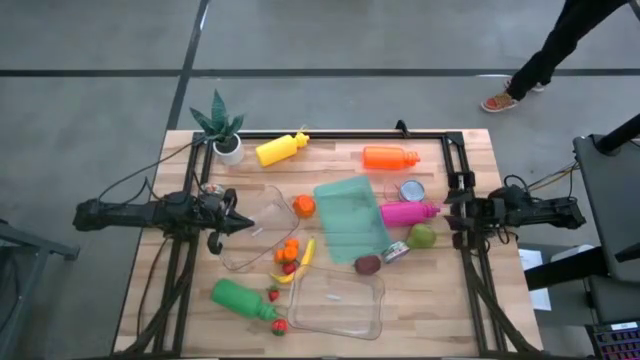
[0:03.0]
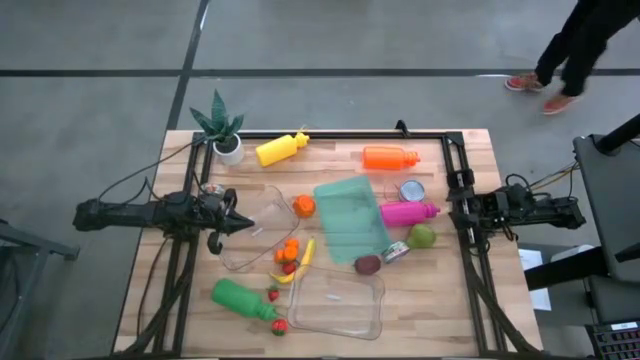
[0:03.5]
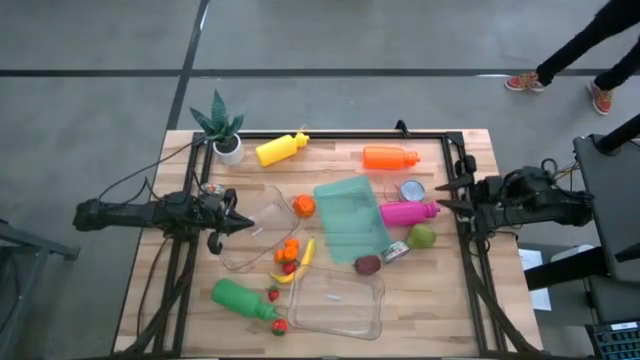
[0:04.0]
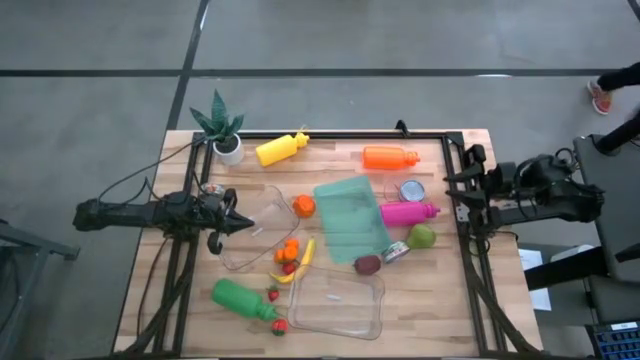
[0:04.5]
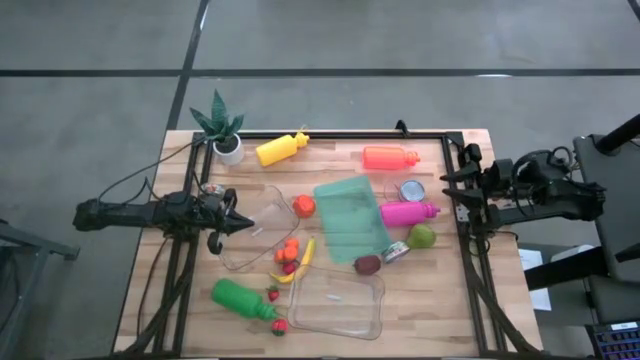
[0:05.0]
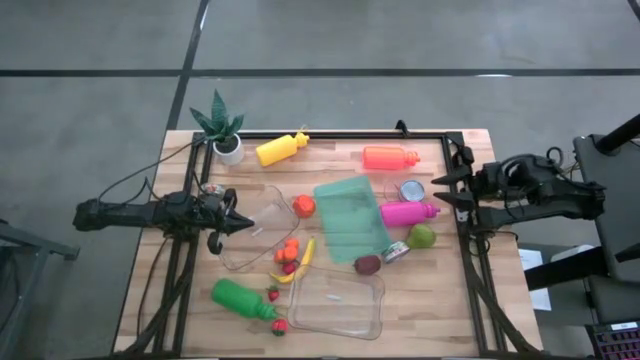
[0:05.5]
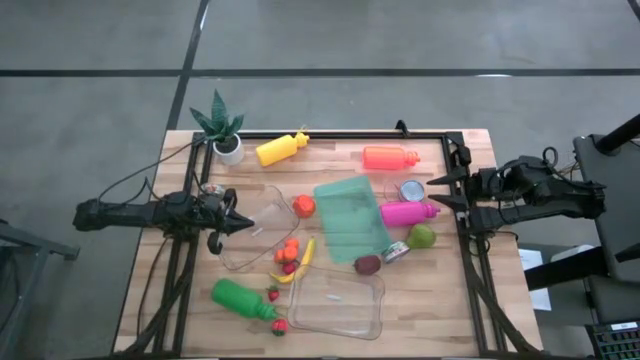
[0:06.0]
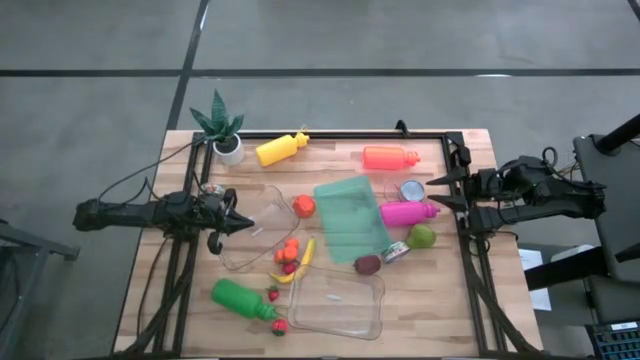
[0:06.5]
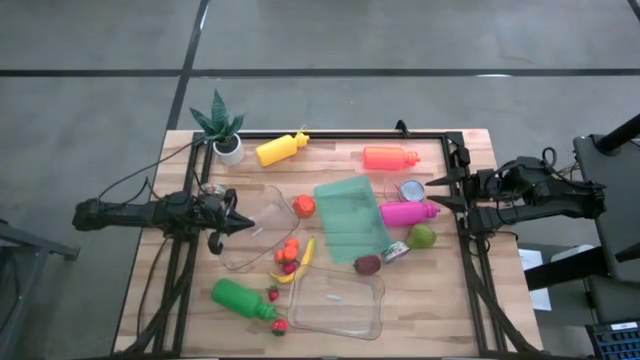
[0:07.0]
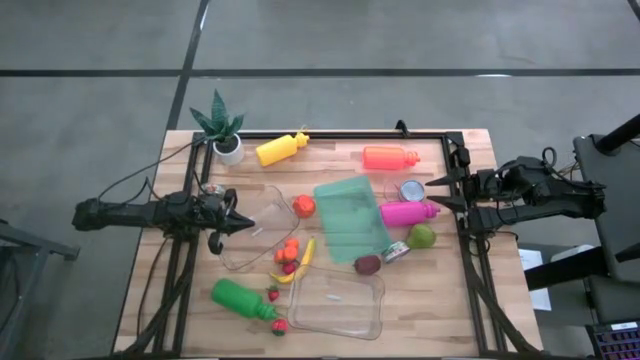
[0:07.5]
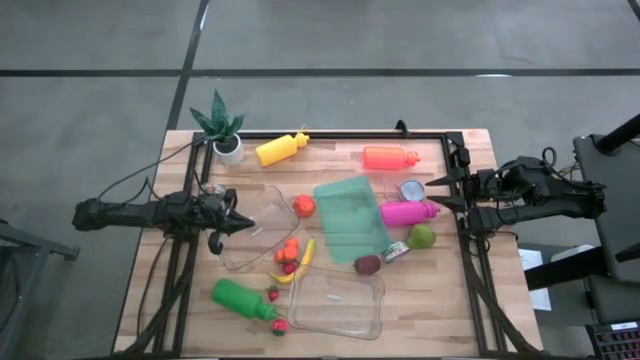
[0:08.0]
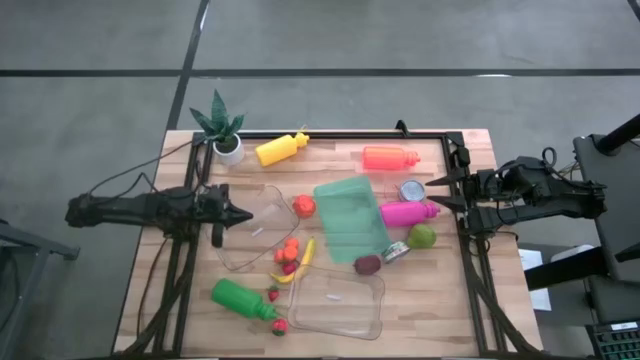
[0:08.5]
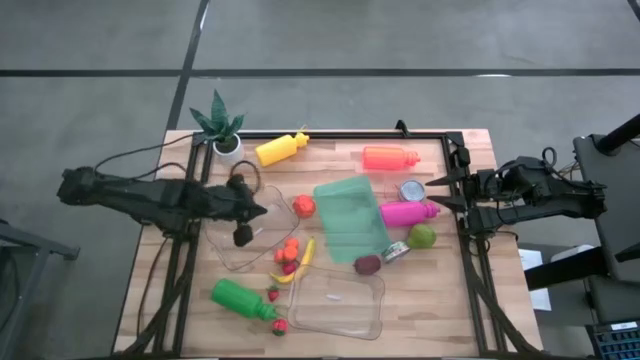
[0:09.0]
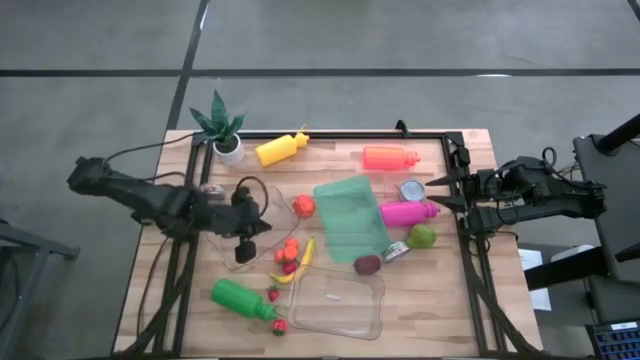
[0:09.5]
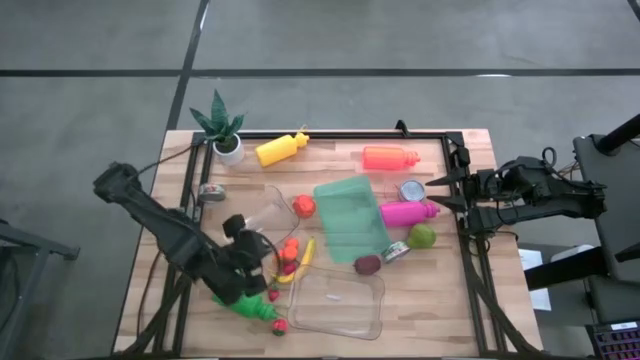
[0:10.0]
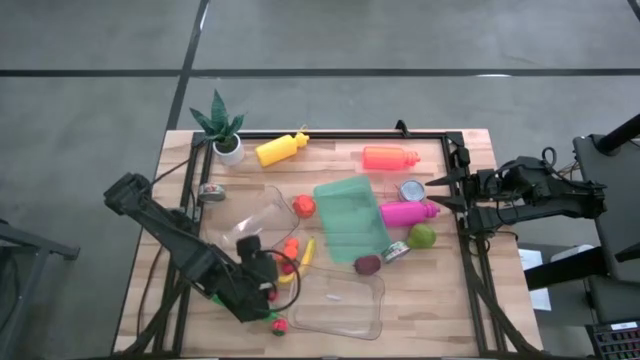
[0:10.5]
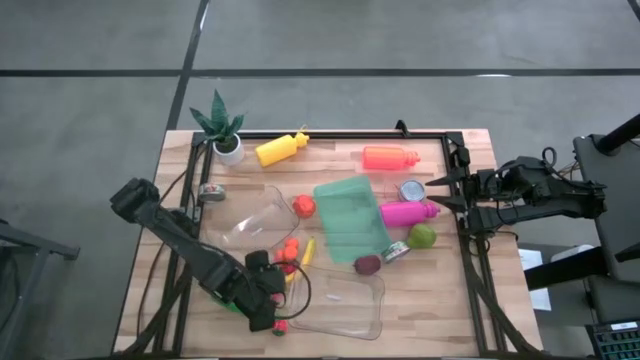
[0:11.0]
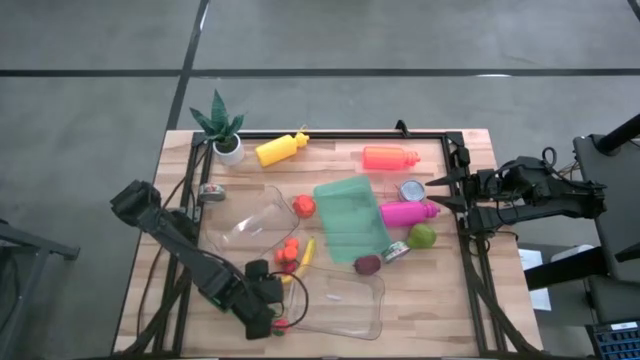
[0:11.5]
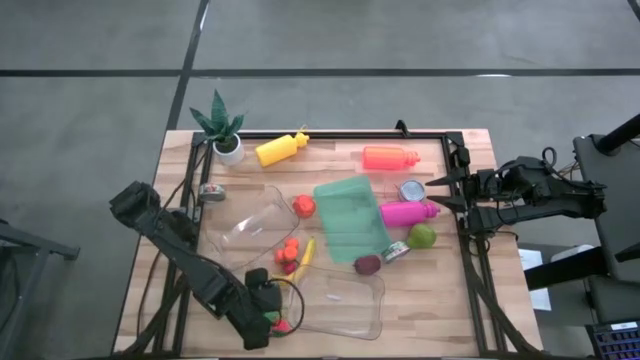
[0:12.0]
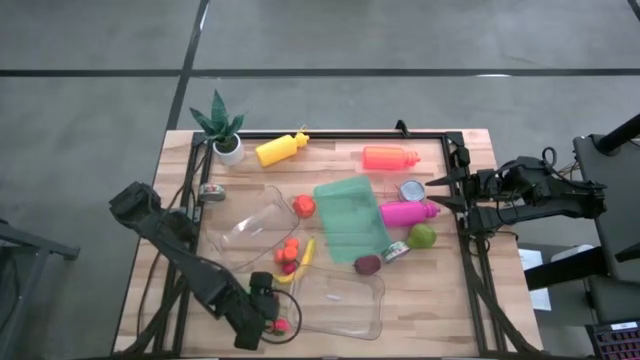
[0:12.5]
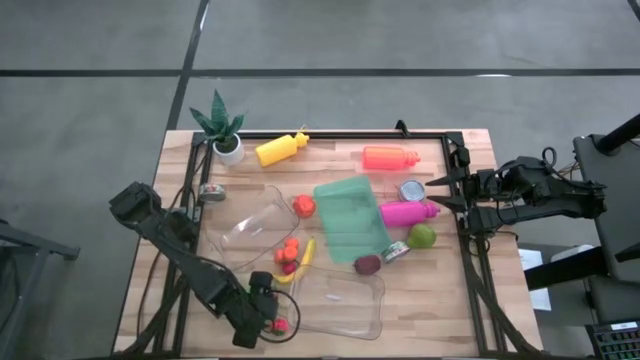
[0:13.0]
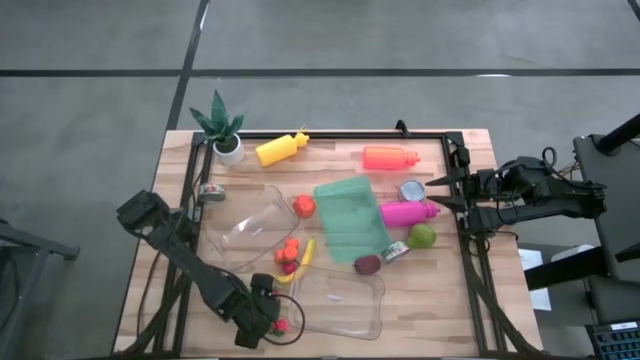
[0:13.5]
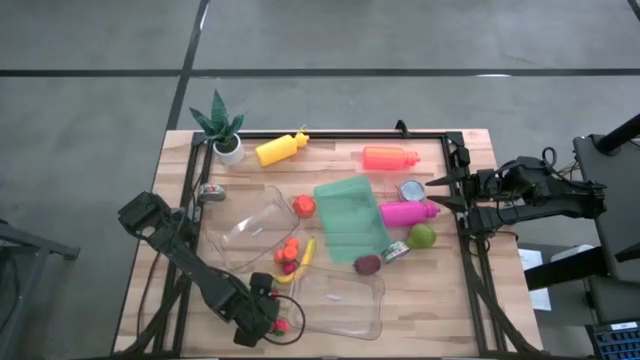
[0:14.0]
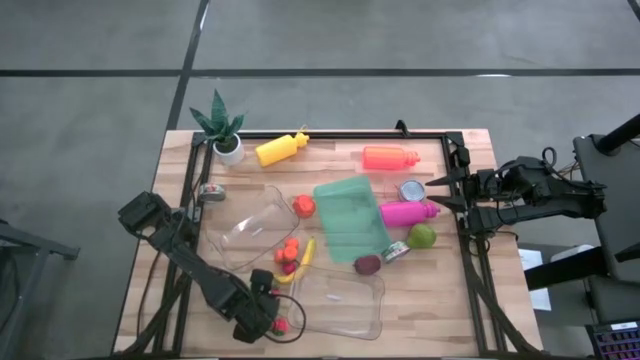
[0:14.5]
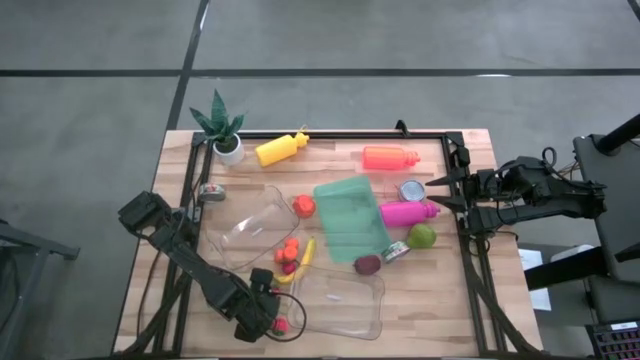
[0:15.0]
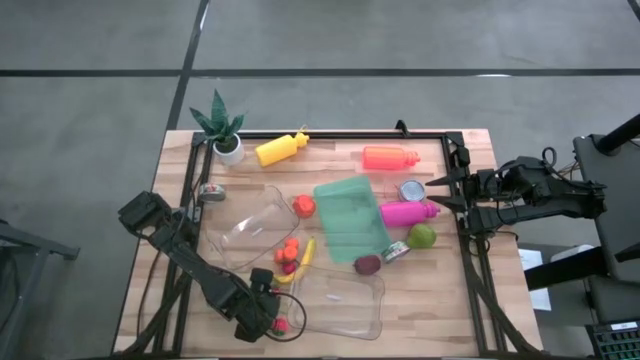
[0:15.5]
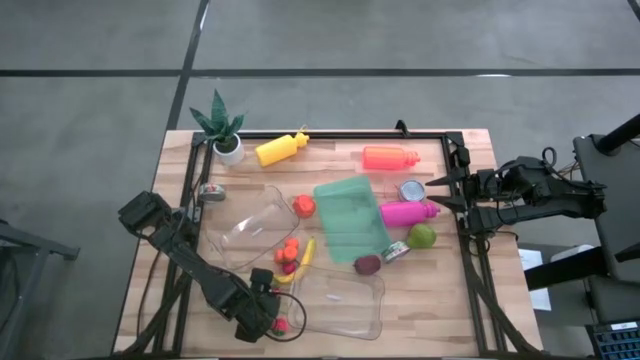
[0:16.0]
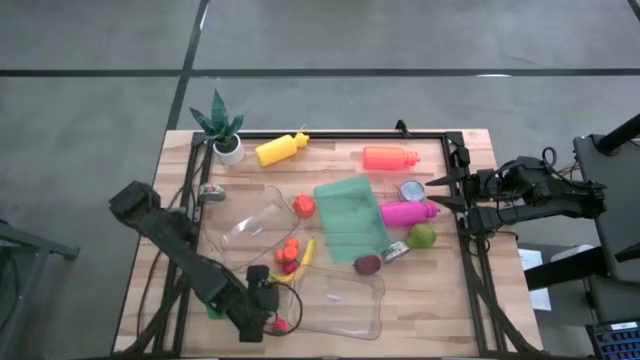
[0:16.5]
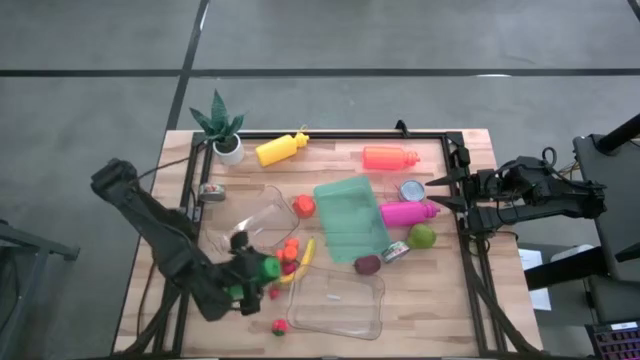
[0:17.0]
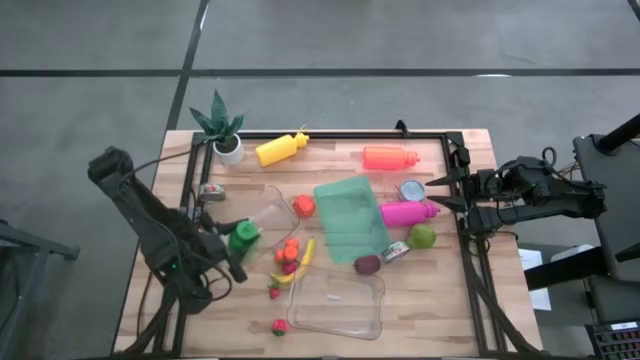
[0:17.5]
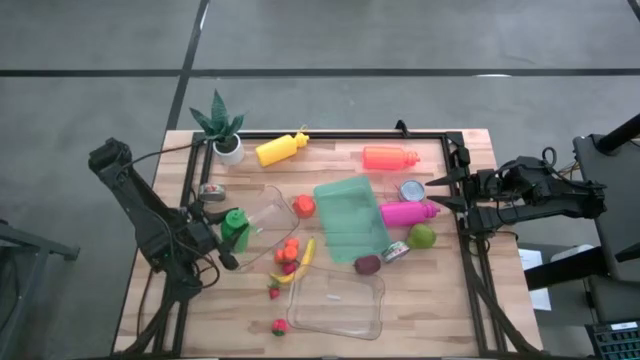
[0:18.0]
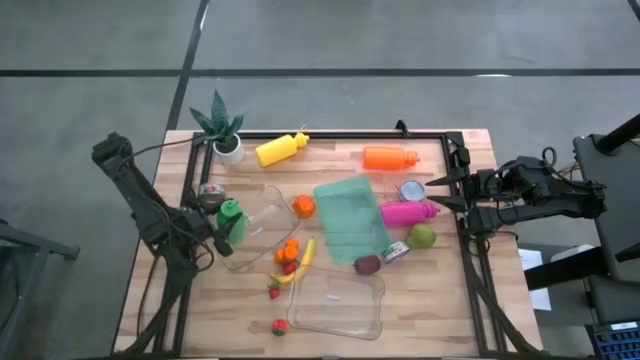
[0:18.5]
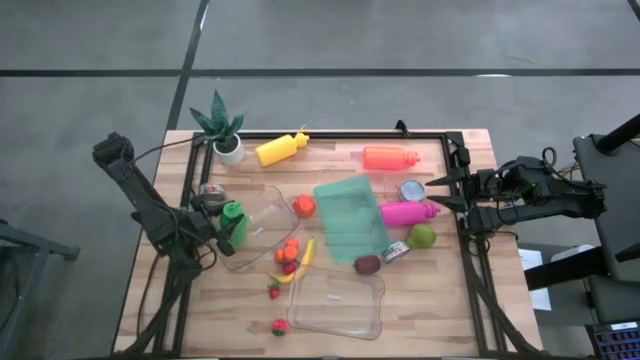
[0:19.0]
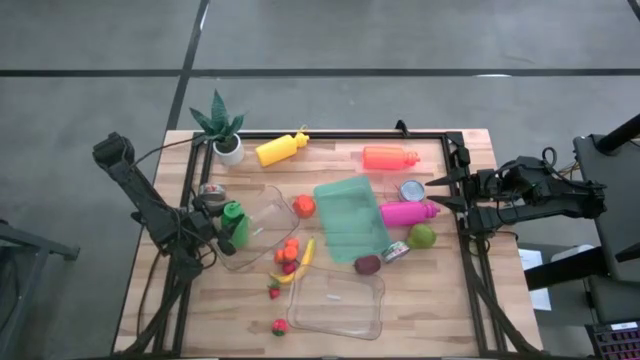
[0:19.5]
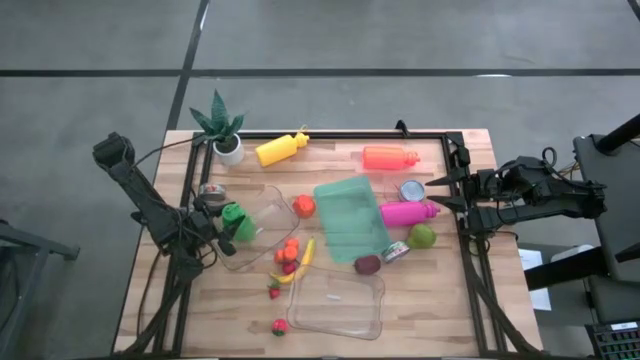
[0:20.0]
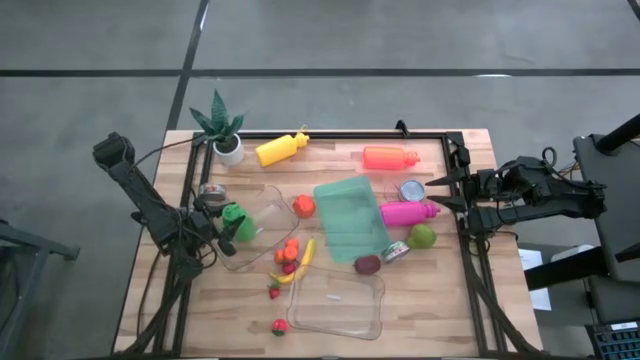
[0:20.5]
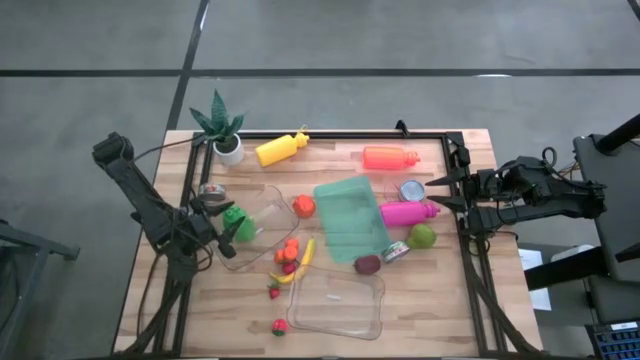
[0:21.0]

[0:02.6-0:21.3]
Task: Pick & Place Food Item
Put the green water bottle into the top transparent bin

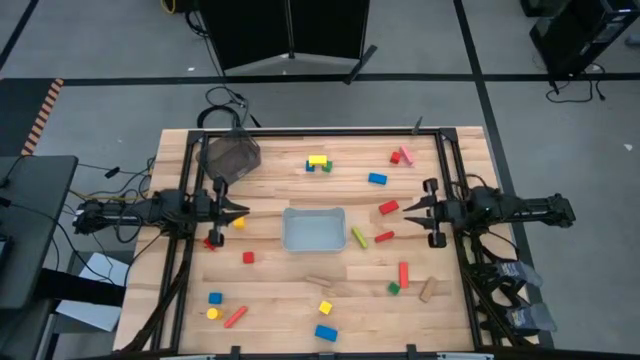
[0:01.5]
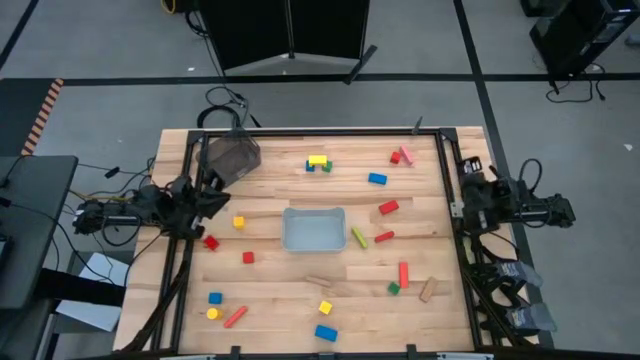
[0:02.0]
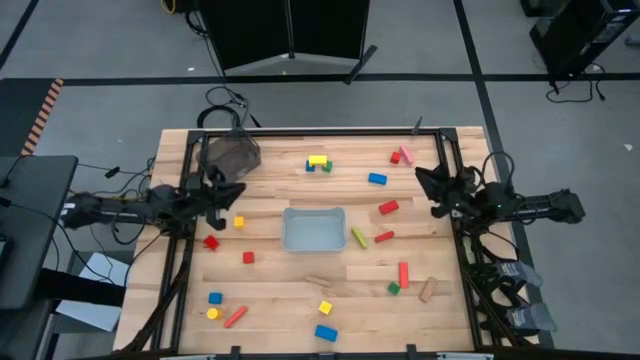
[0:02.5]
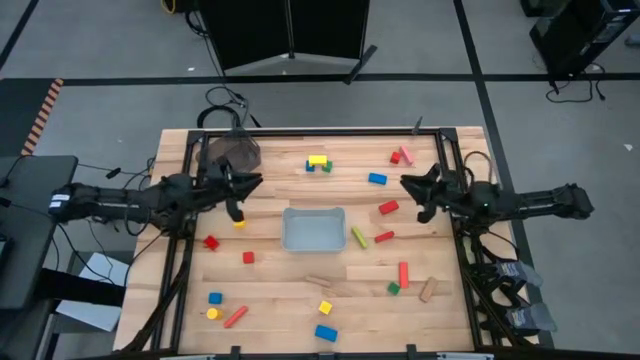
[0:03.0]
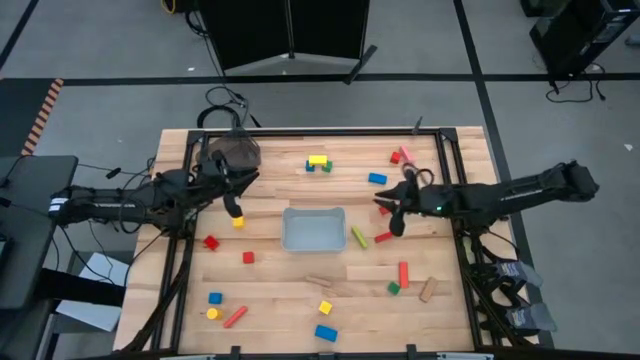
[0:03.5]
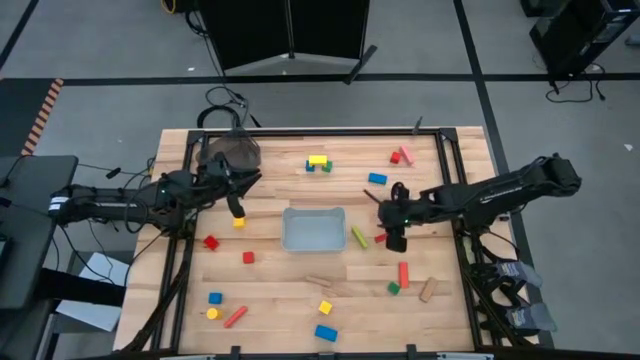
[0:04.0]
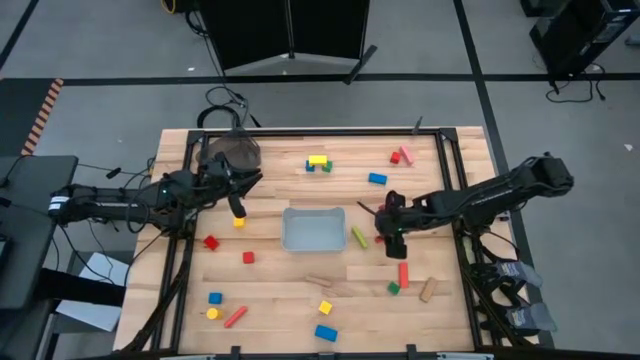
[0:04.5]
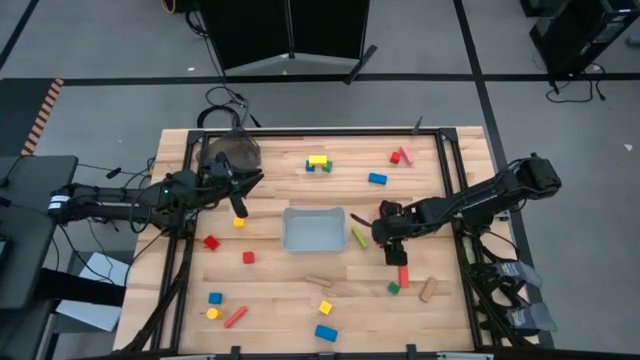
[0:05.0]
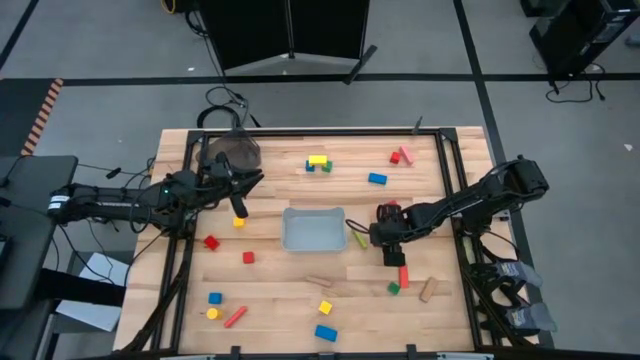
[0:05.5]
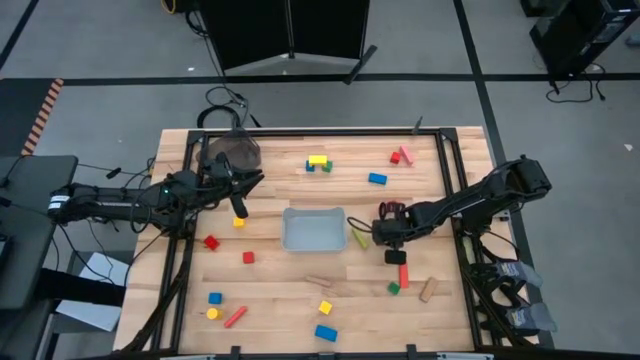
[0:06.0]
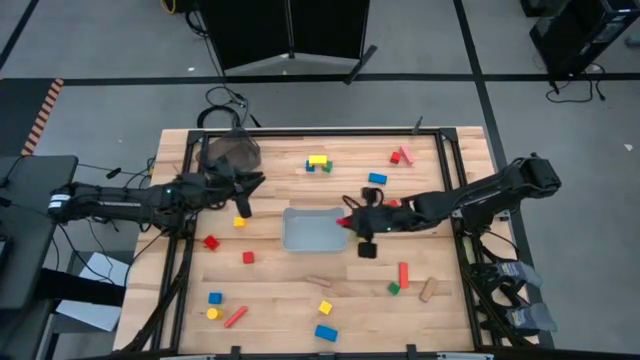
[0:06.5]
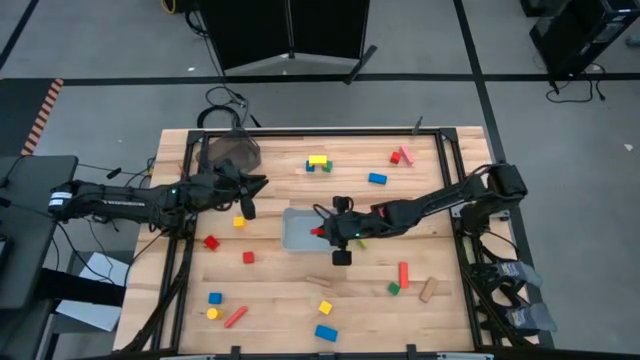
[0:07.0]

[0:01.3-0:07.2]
Task: Sort blocks by size
Put the middle red rectangular block into the gray bin
